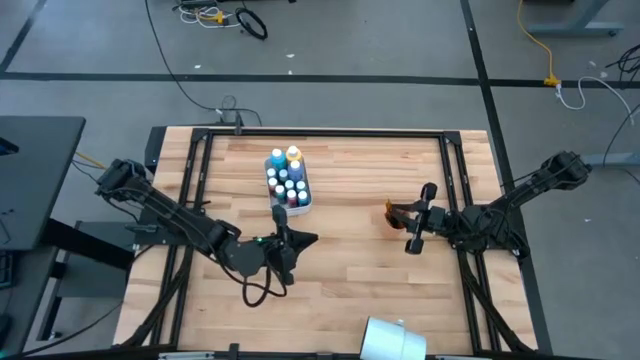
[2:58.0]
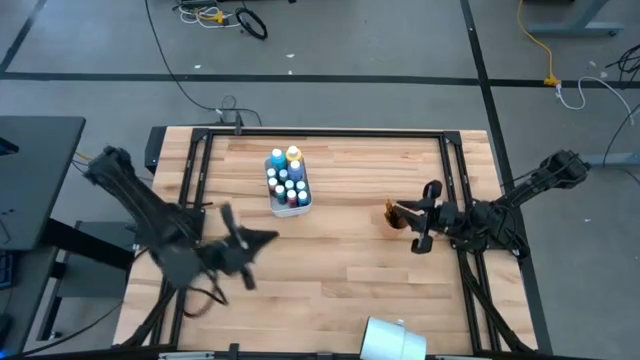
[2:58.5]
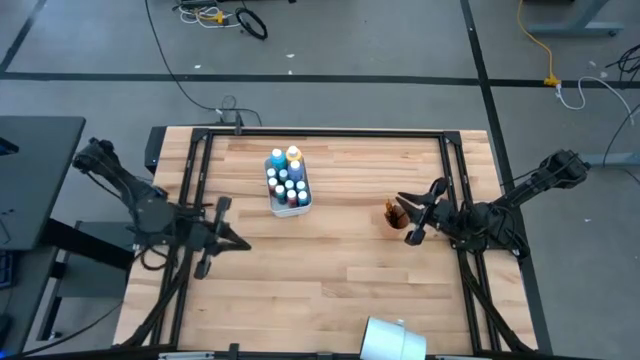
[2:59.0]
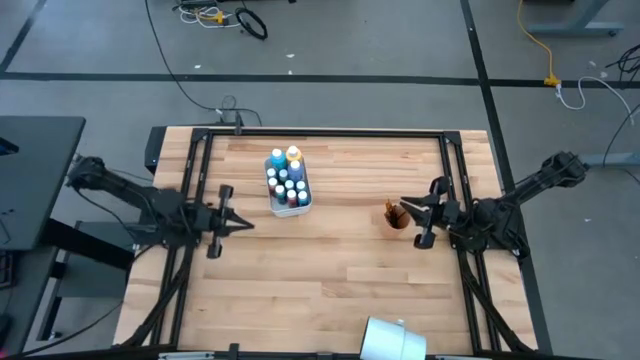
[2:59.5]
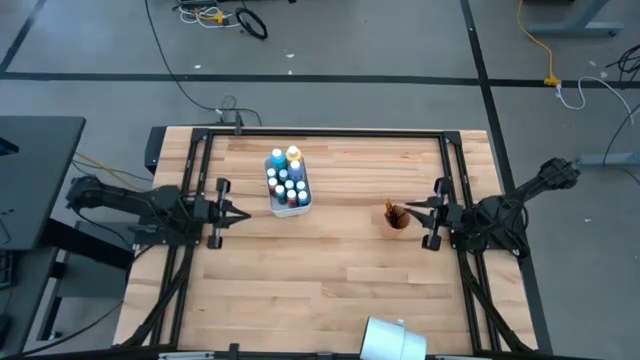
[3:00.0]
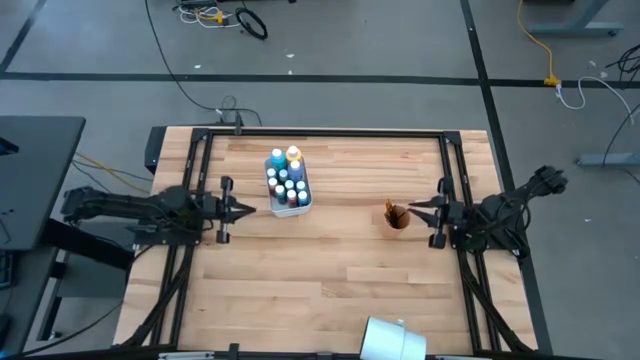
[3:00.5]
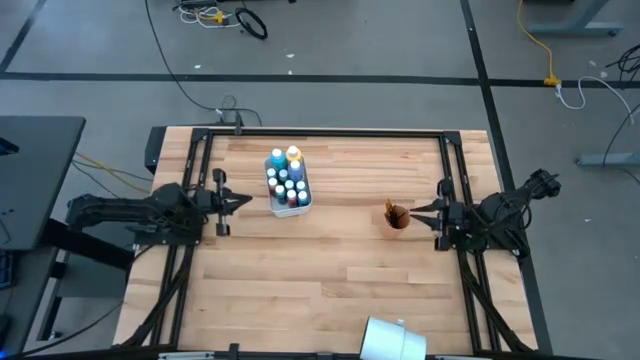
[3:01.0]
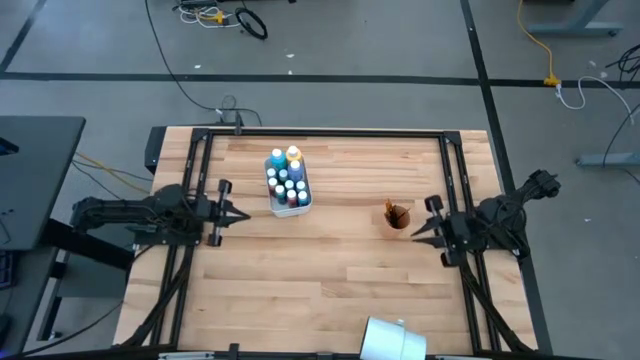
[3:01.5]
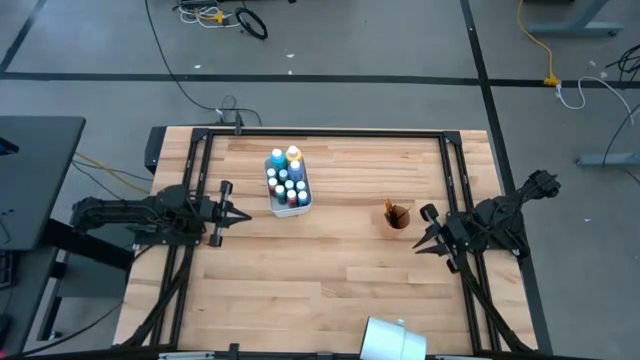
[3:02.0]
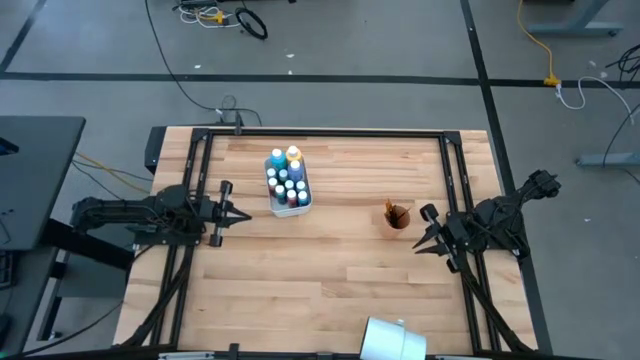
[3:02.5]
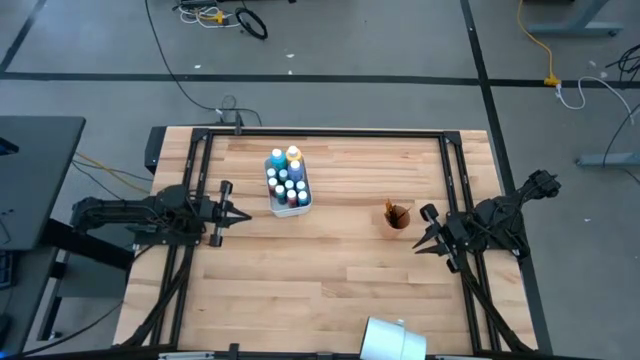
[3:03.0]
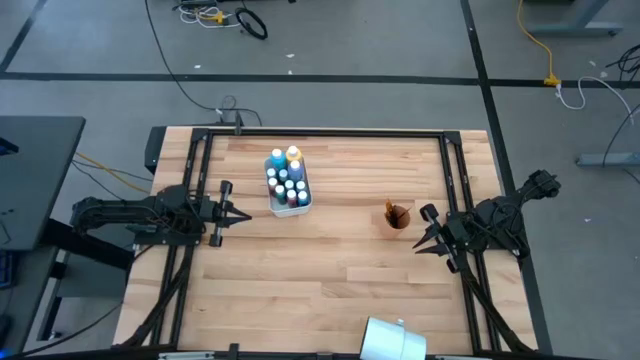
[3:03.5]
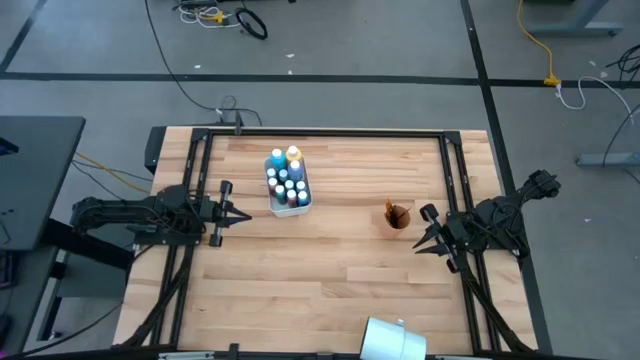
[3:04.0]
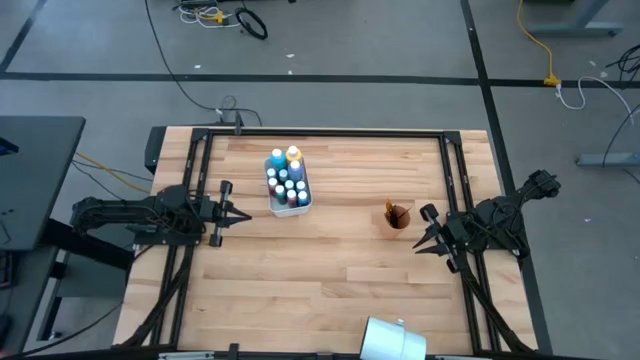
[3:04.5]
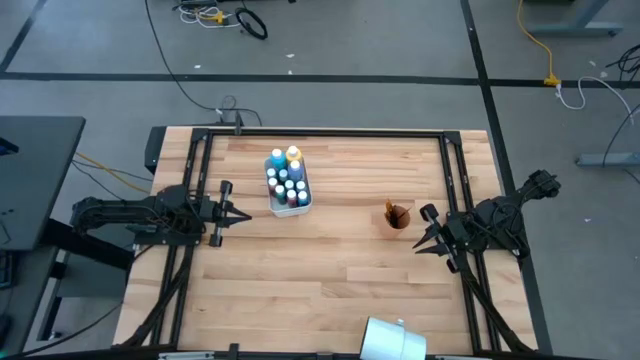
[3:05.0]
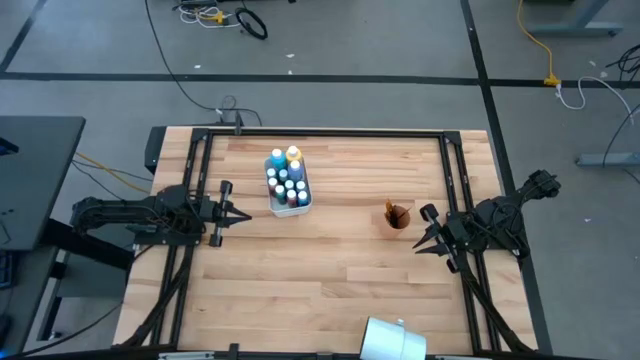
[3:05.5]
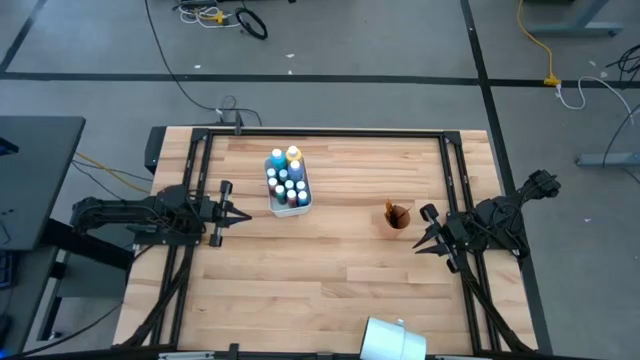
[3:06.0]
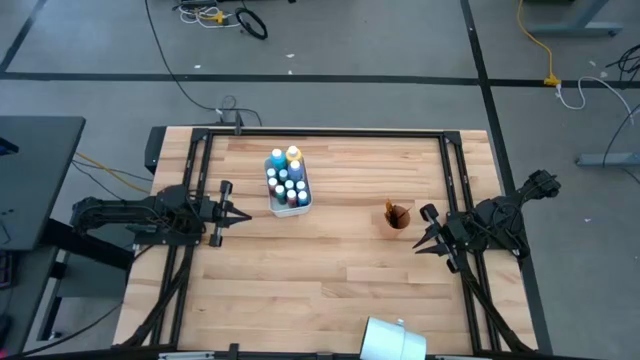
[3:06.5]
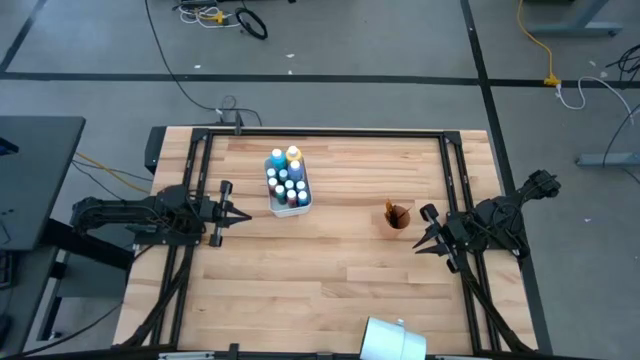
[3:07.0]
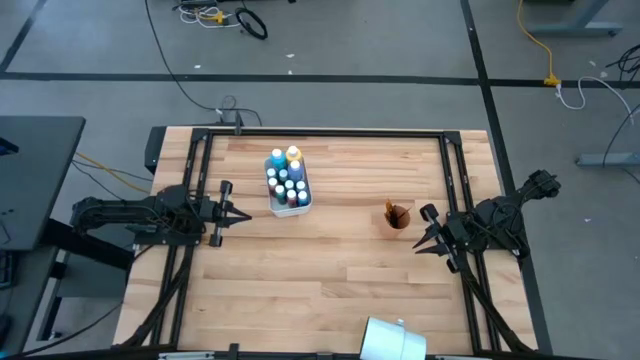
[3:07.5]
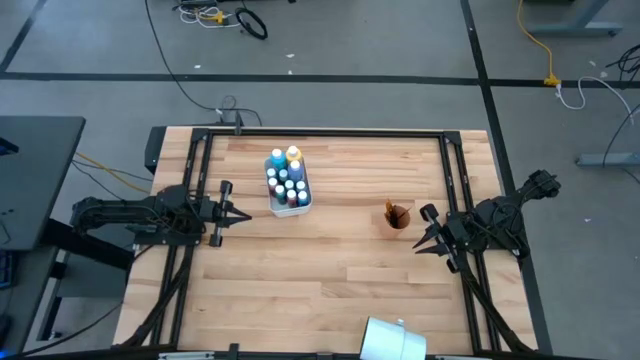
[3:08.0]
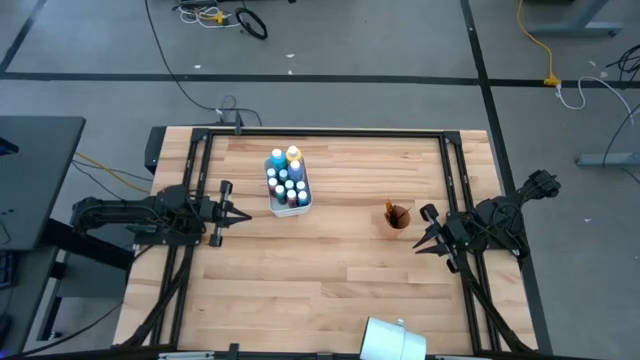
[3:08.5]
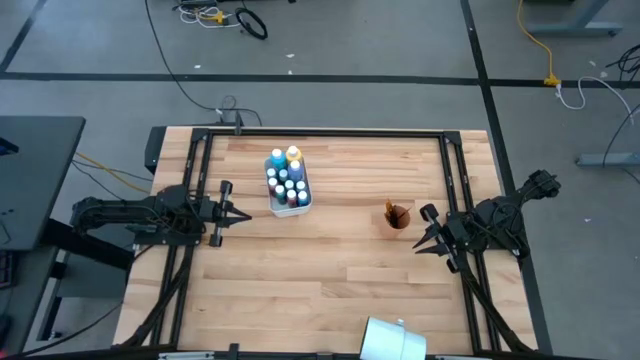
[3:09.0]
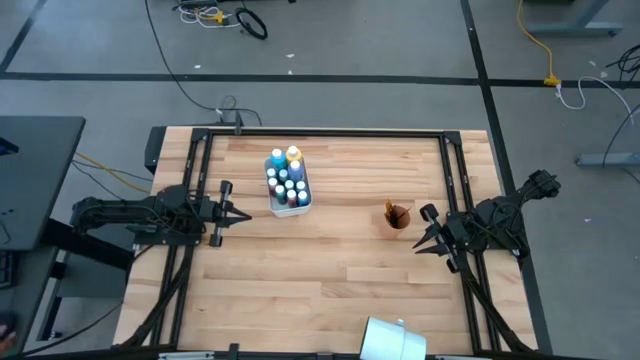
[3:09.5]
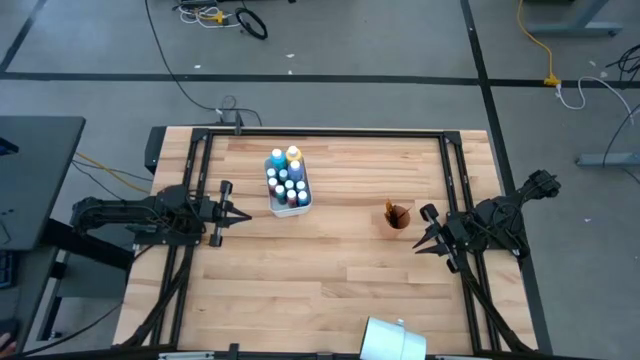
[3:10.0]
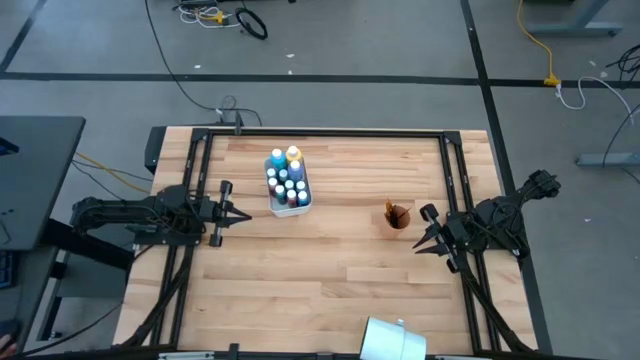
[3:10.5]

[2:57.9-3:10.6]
Task: Pick & Place Paint Supplies
Return to Home Position

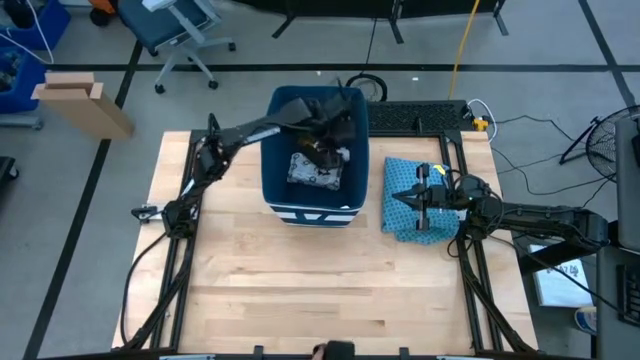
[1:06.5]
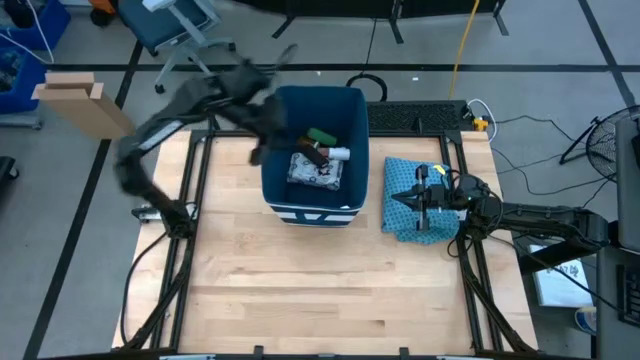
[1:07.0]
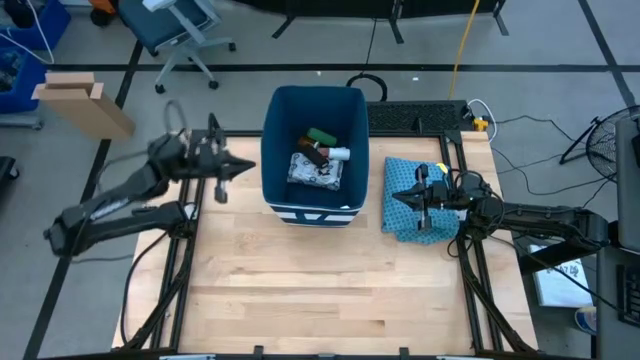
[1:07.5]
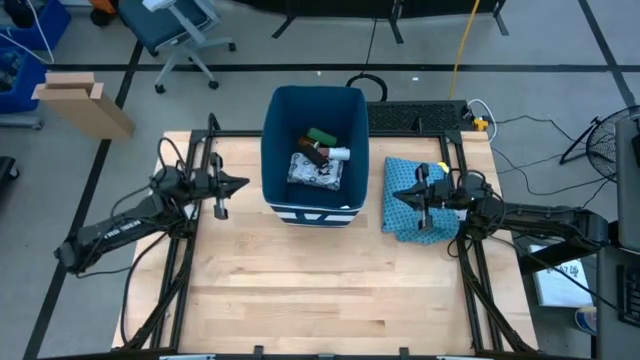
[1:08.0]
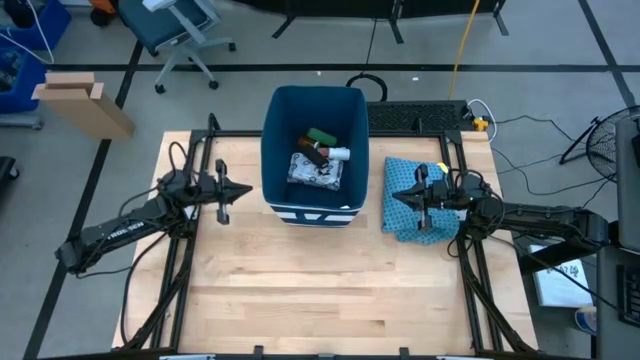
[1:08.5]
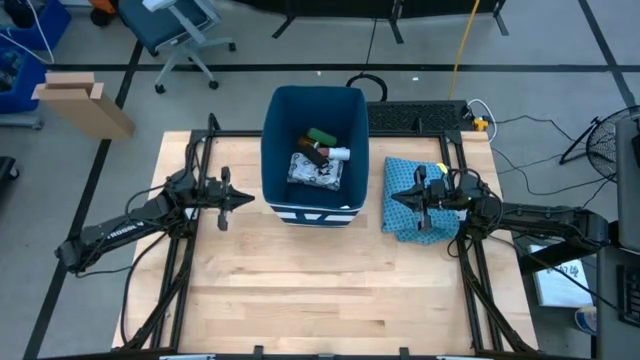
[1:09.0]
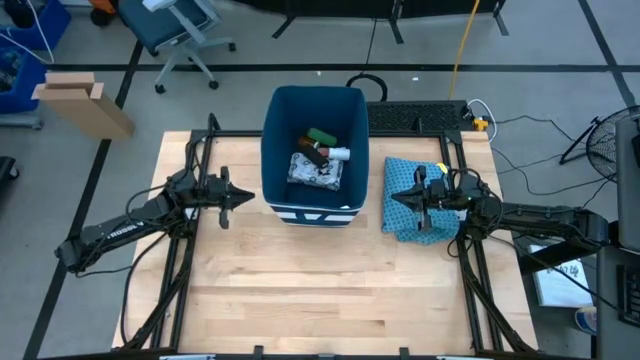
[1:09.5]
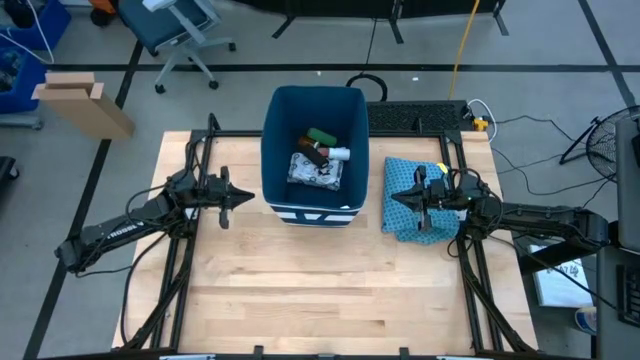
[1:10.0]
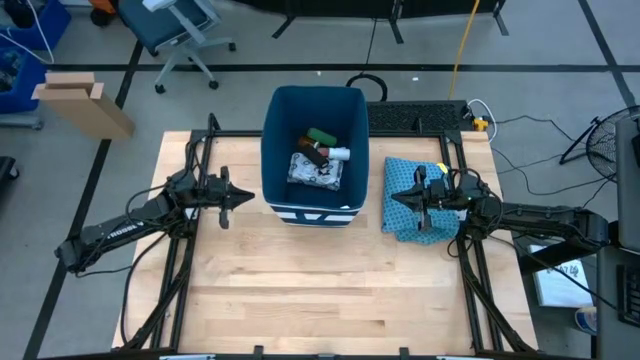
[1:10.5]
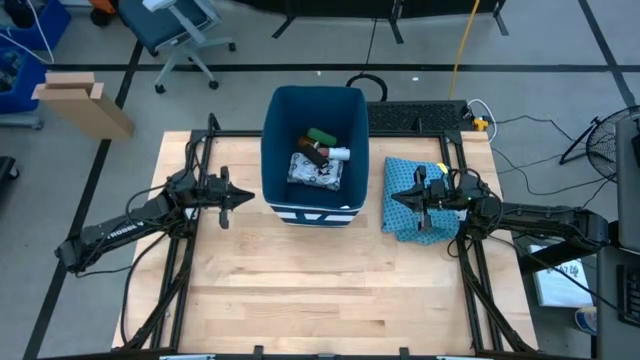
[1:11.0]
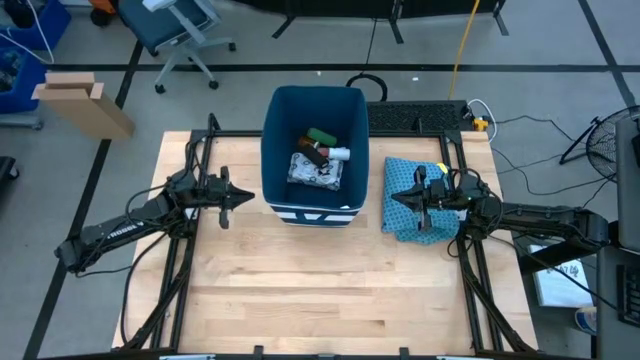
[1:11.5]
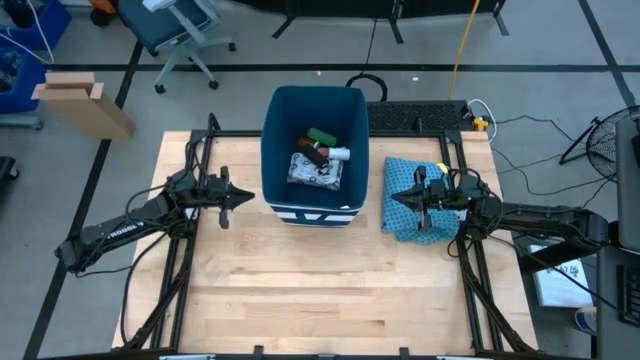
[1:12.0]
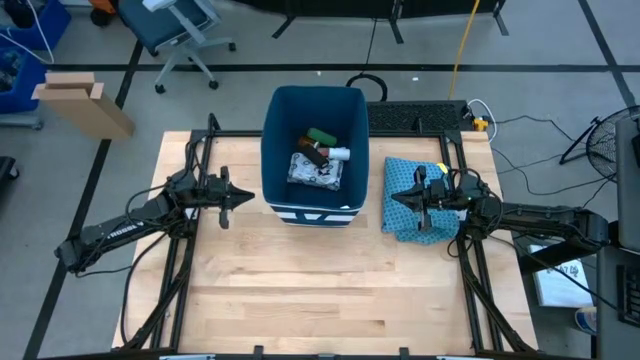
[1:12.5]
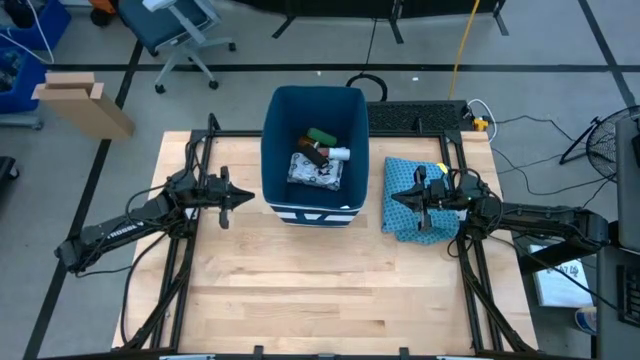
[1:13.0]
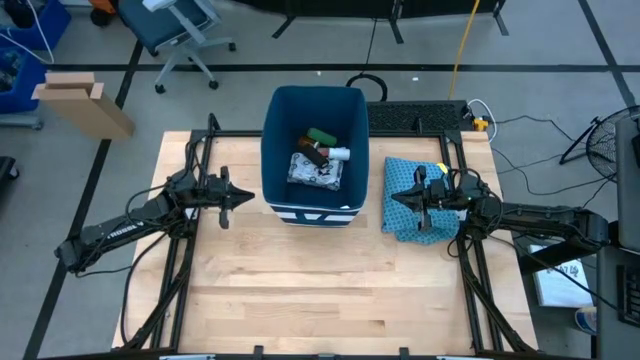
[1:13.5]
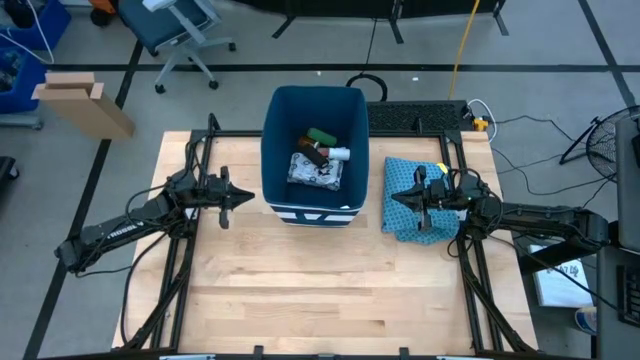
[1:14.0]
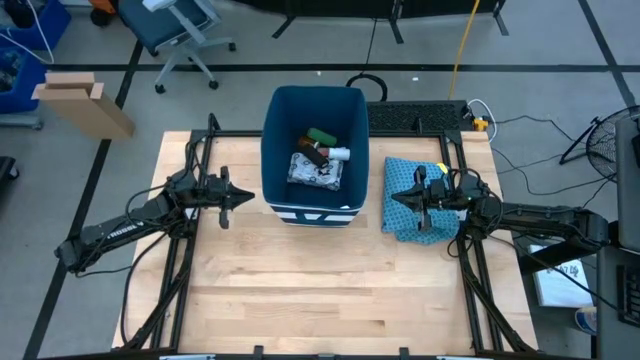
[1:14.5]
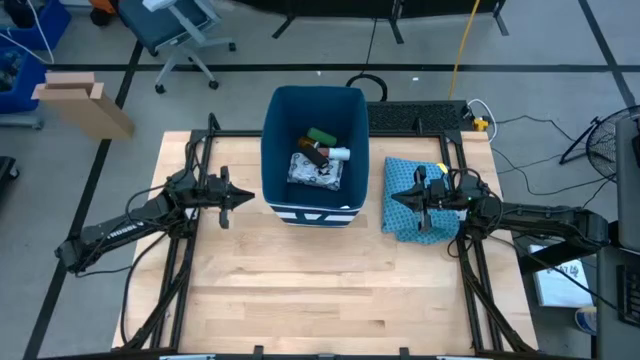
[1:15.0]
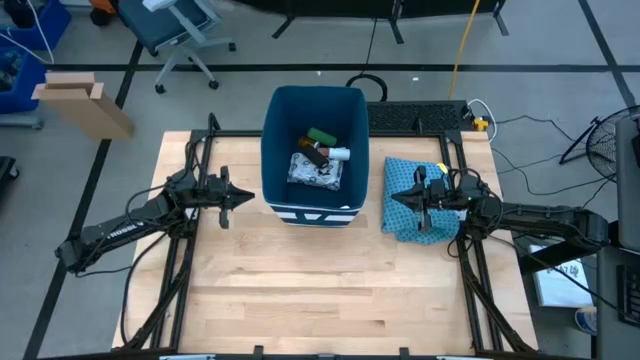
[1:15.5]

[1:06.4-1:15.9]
Task: Pick & place medical supplies in basket/bin
Return to Home Position
